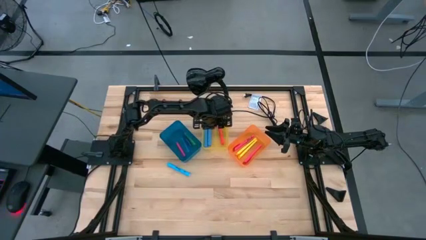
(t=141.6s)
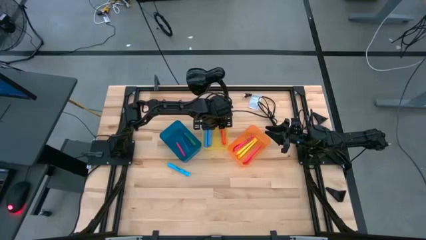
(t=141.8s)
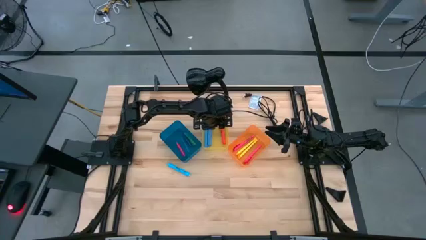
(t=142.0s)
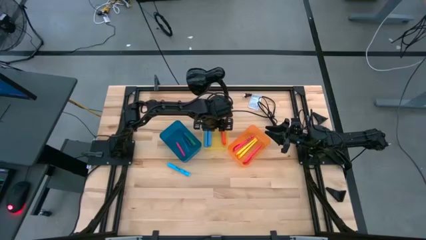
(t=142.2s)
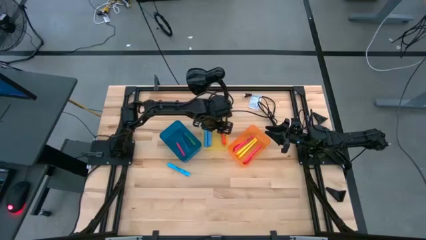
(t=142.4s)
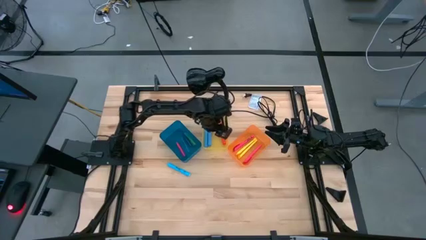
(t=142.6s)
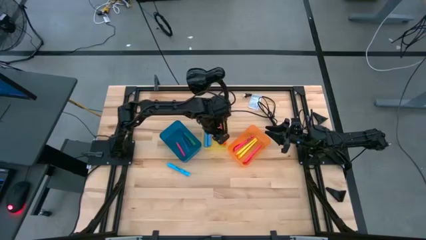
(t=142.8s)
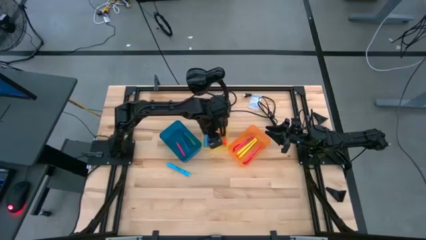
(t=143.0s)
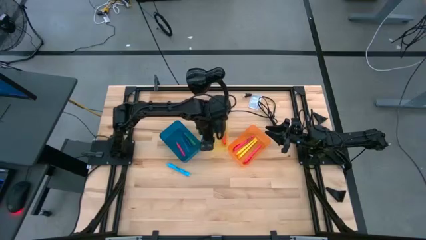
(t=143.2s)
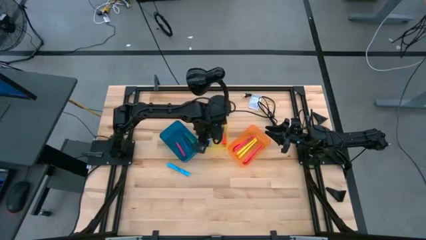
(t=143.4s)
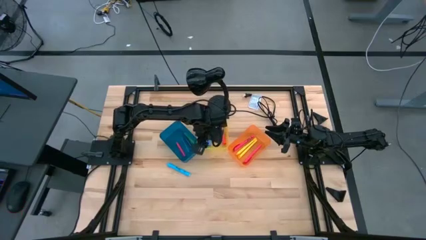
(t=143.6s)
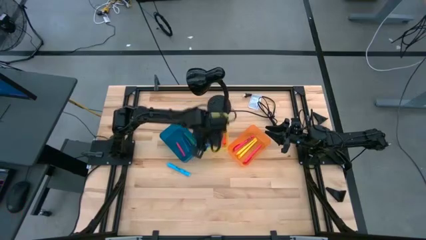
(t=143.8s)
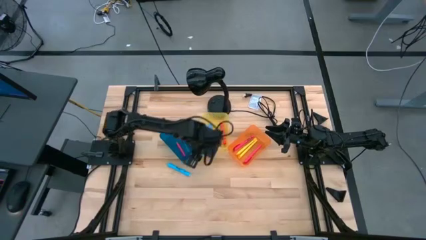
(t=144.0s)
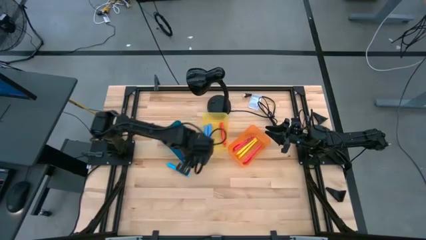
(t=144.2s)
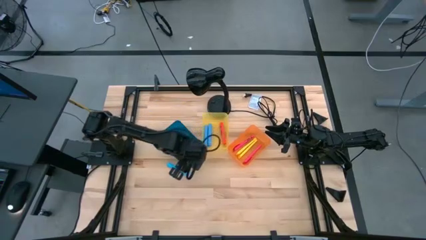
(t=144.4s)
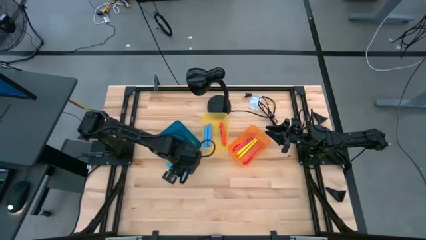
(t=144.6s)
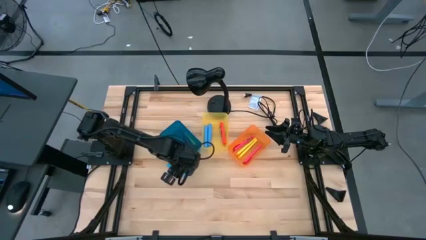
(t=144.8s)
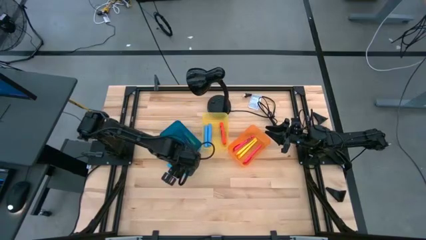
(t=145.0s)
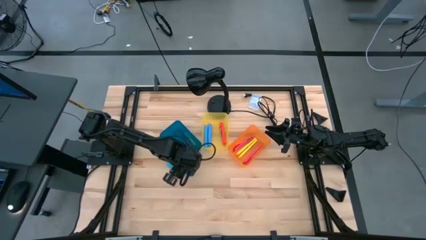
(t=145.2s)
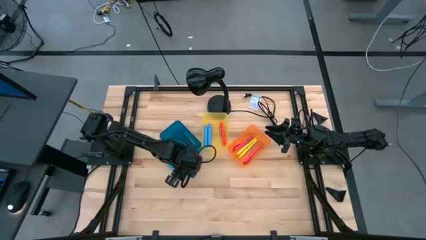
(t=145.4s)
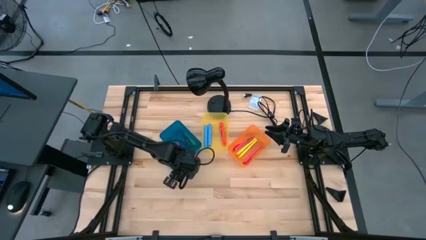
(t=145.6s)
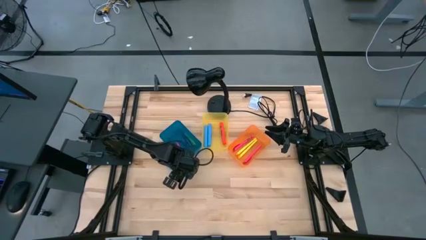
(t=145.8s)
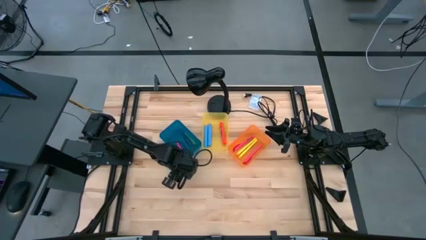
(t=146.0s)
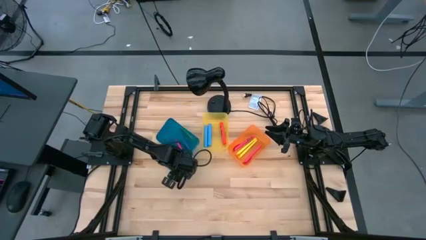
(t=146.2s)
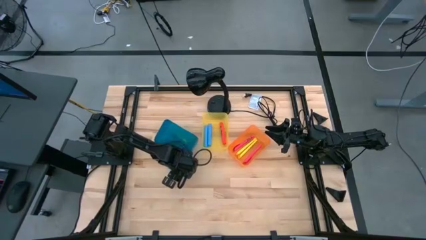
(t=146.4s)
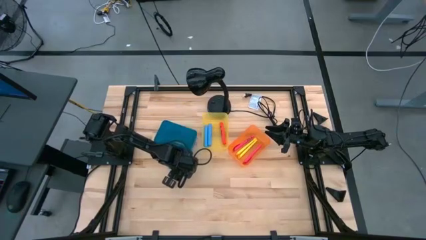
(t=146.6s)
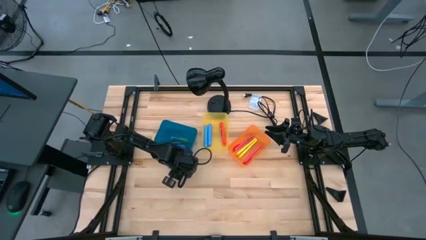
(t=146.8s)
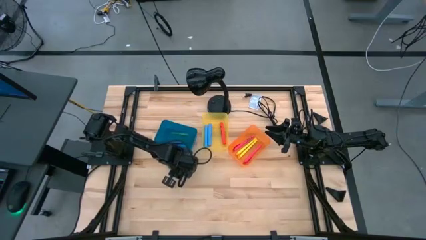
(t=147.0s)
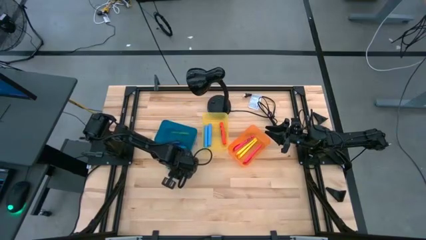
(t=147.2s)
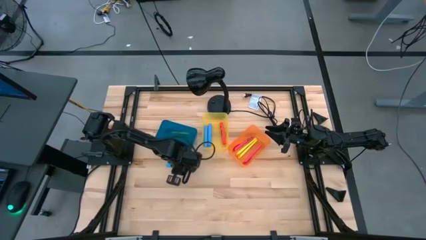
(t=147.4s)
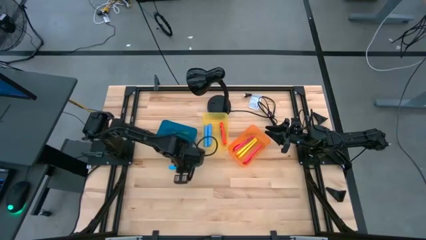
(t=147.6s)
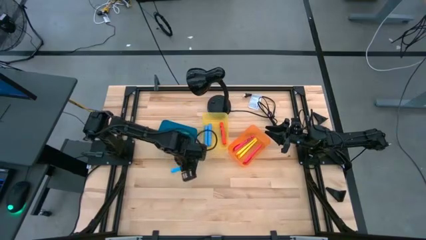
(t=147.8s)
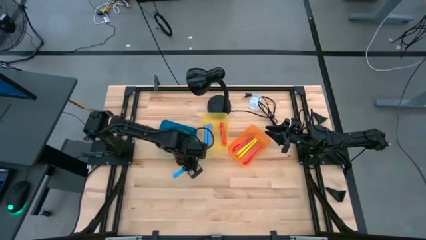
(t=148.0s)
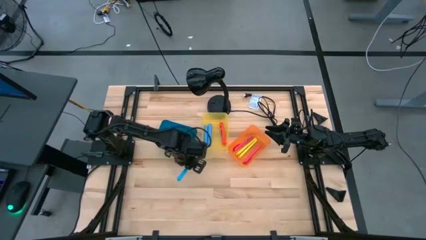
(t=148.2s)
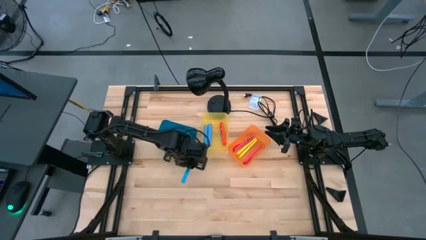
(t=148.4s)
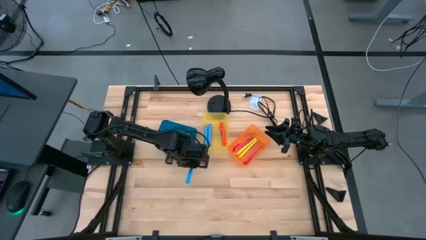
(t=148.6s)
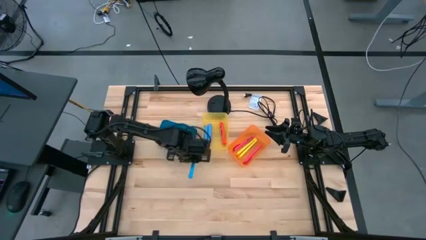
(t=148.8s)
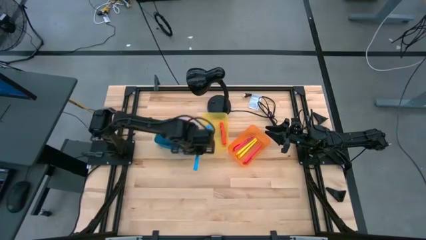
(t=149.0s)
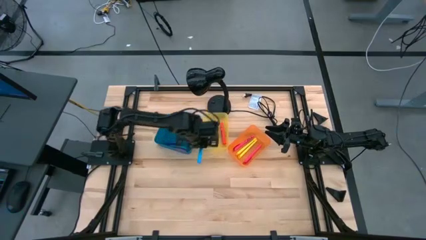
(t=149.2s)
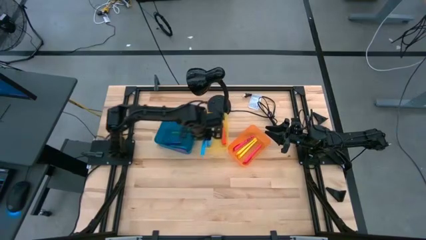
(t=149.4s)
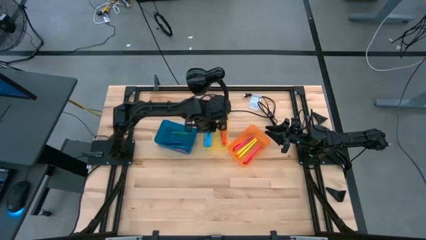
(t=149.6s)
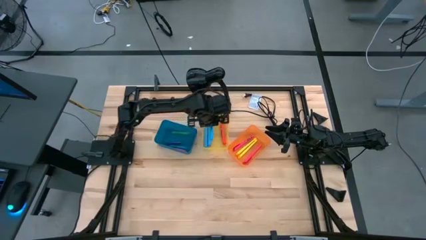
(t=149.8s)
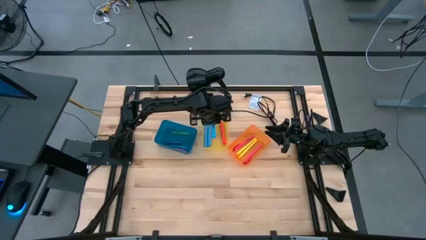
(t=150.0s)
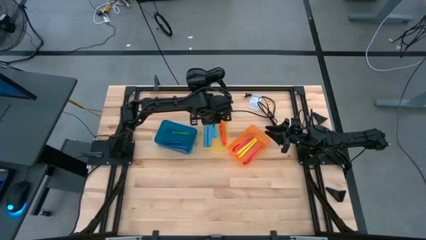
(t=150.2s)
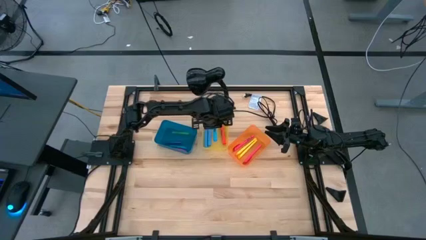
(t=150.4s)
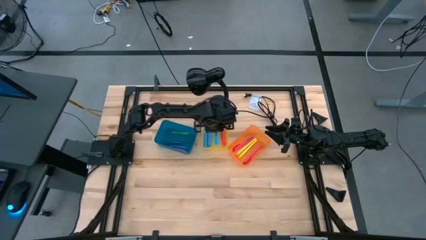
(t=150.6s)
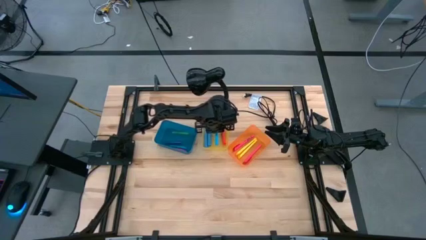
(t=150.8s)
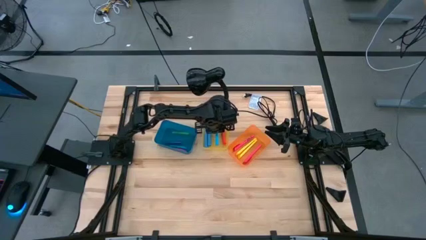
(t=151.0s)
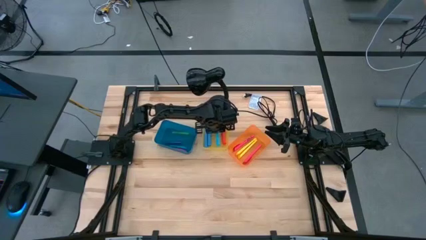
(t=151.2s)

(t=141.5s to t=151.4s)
Task: Pick & Place Markers
Put the blue highlighter pen into the yellow bin

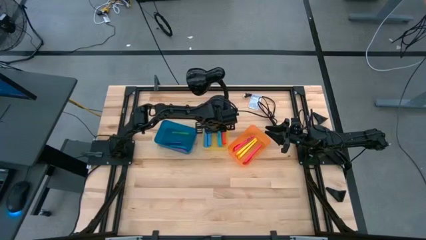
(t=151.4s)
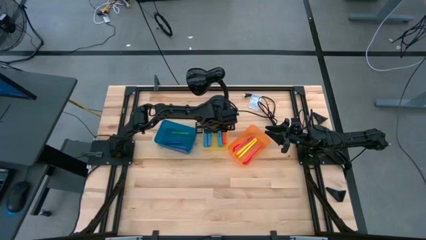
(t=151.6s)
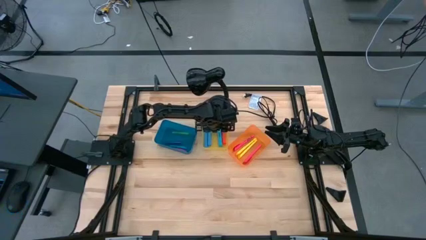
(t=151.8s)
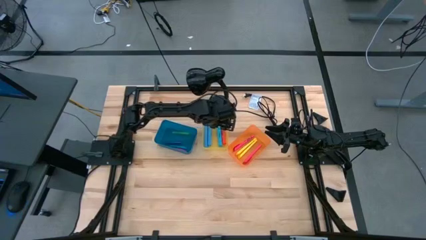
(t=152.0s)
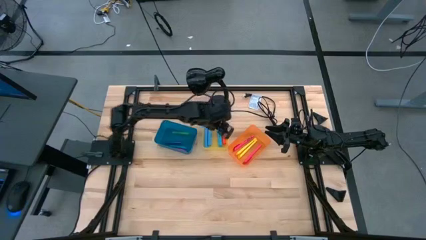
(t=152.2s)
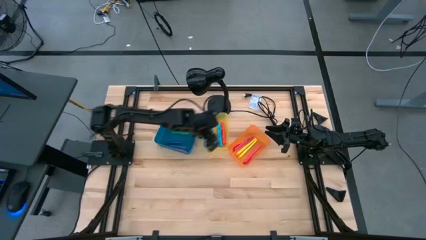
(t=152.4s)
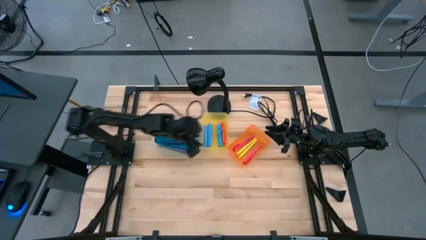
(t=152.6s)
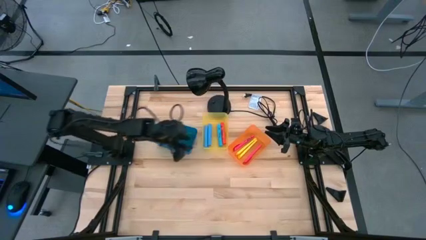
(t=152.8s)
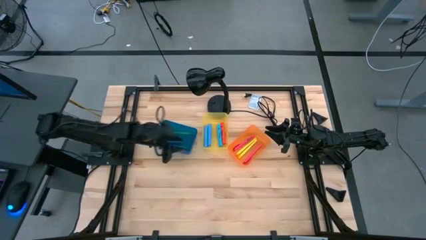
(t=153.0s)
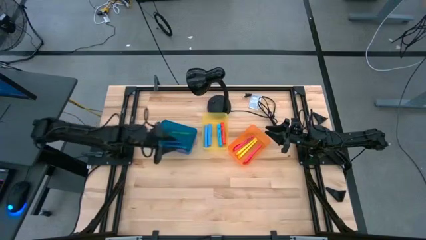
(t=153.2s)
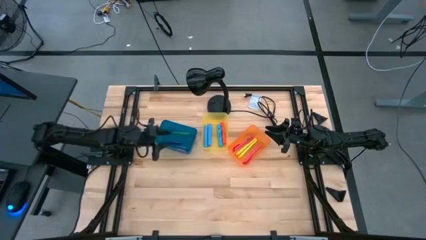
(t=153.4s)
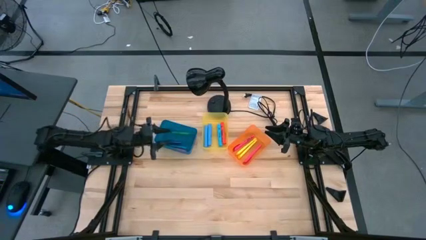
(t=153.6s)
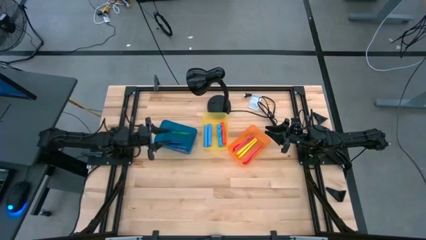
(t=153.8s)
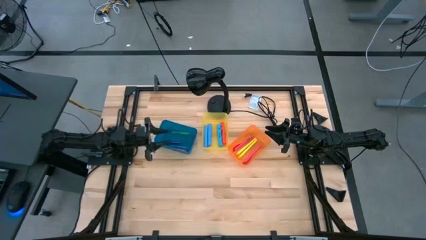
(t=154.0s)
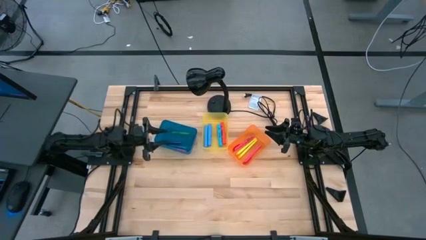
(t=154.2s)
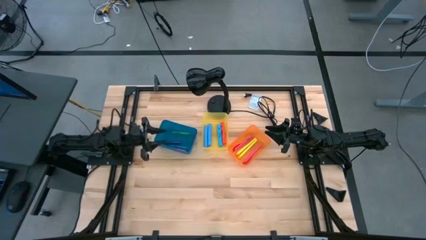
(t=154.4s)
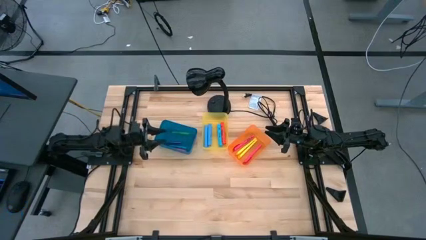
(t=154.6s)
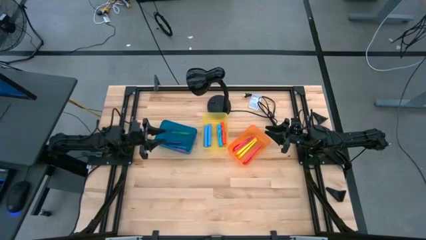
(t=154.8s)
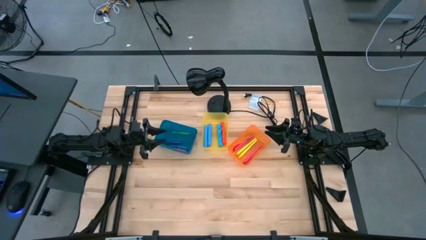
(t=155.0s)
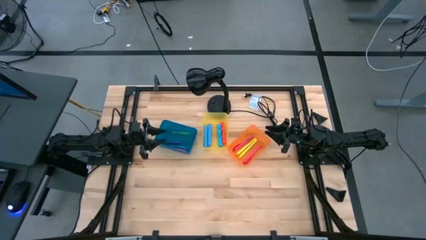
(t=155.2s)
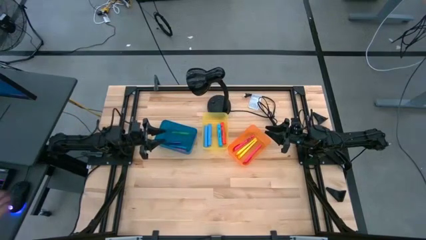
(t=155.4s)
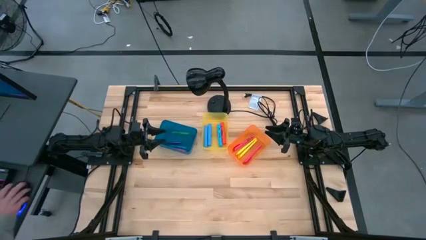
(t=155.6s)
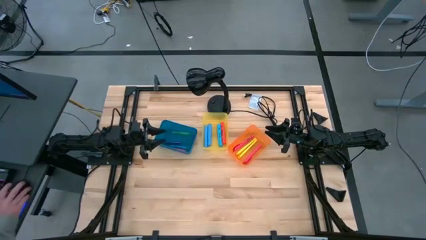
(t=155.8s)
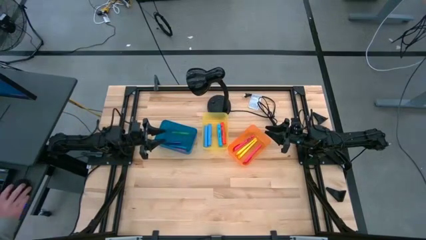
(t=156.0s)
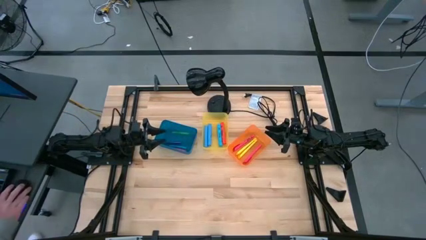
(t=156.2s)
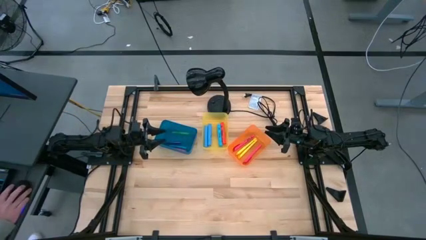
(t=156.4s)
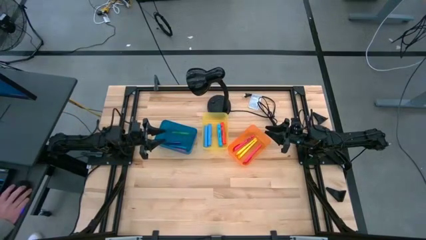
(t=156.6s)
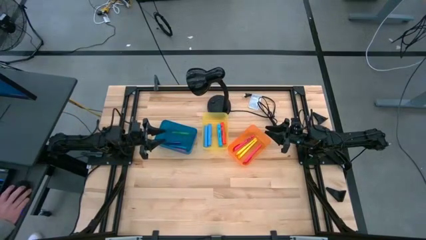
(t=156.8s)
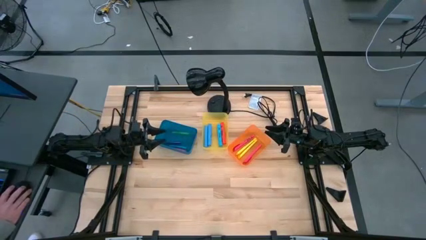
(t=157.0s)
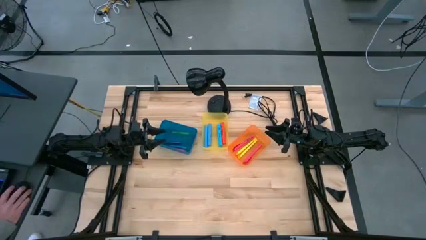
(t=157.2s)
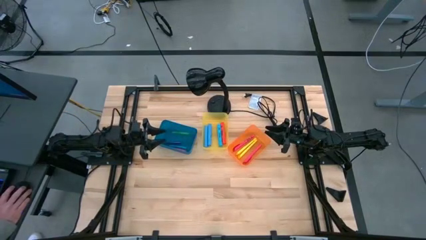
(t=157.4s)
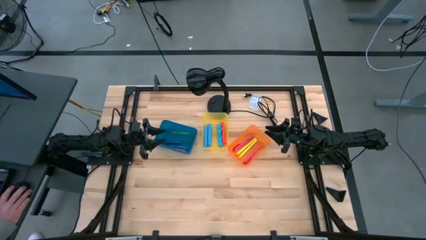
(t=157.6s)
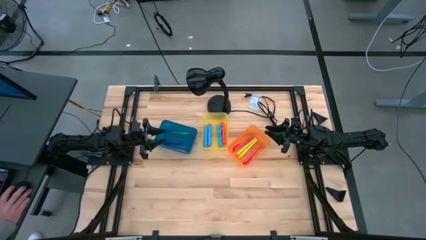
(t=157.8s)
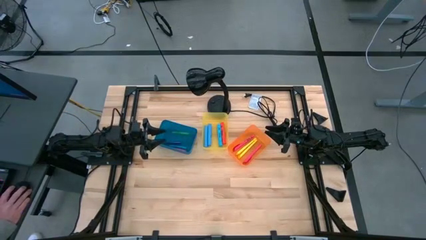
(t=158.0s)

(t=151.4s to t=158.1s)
Return to Home Position
